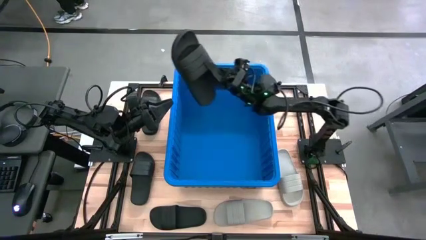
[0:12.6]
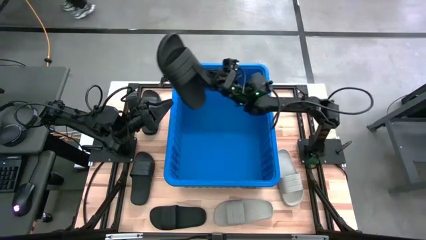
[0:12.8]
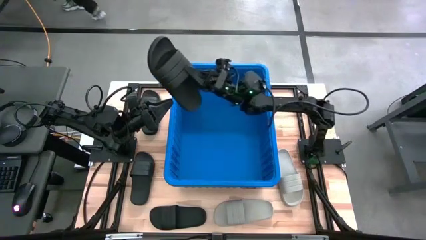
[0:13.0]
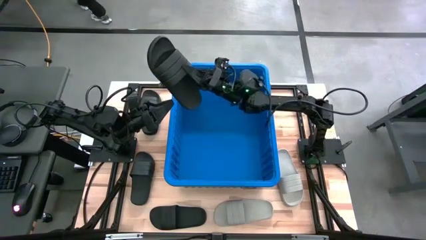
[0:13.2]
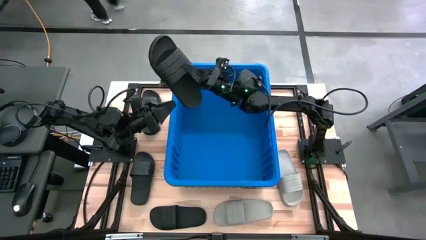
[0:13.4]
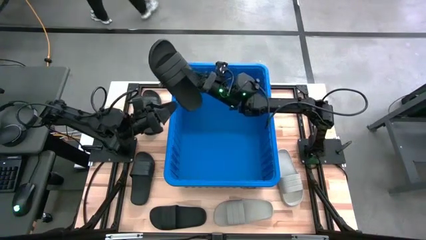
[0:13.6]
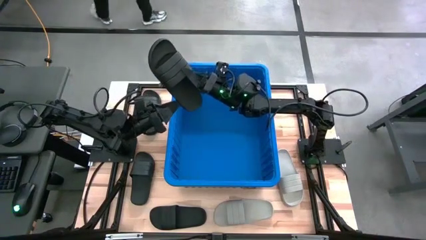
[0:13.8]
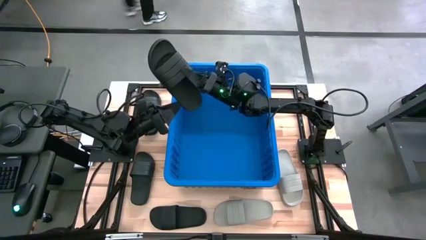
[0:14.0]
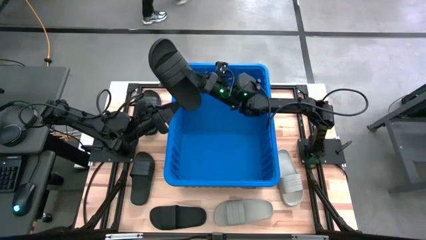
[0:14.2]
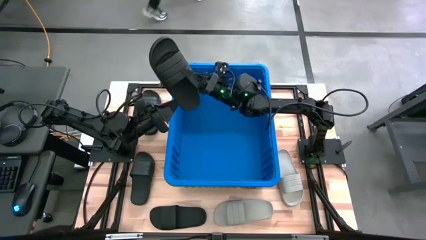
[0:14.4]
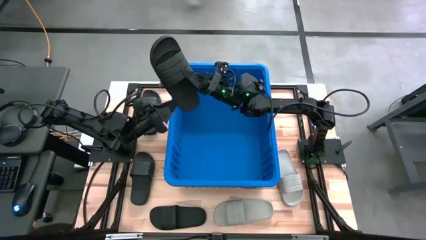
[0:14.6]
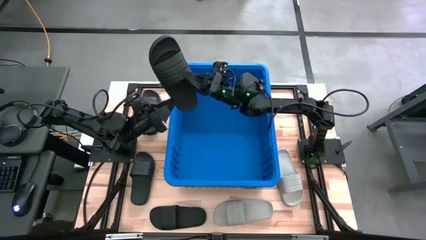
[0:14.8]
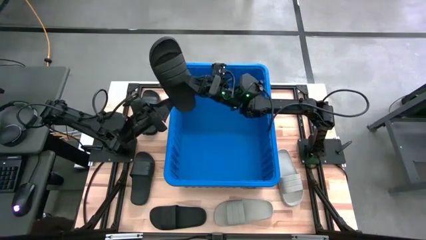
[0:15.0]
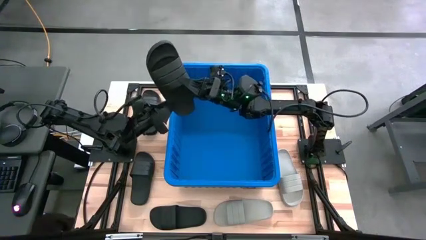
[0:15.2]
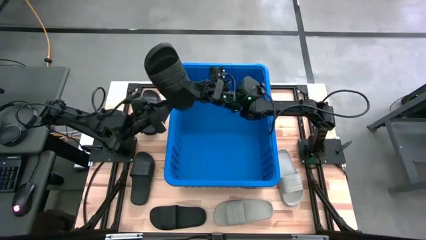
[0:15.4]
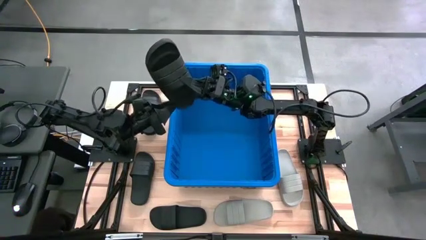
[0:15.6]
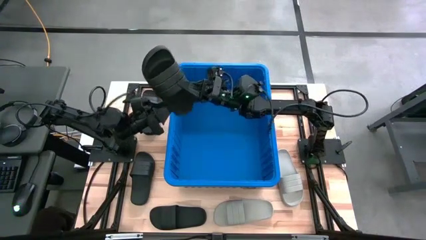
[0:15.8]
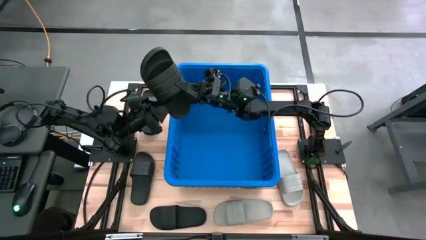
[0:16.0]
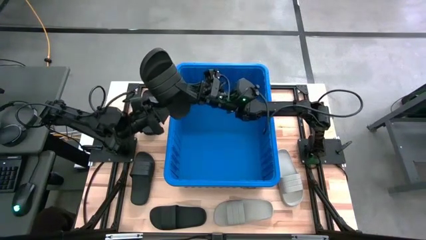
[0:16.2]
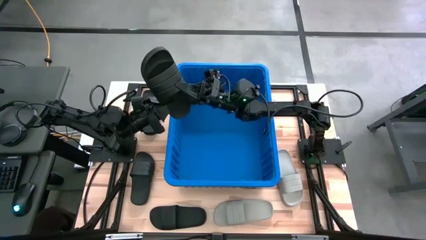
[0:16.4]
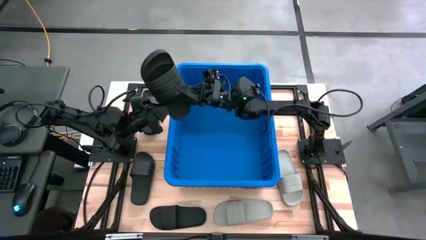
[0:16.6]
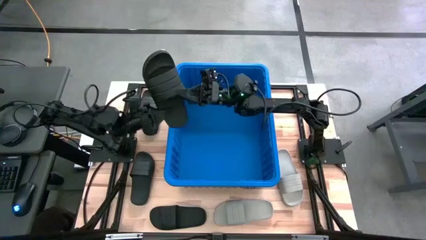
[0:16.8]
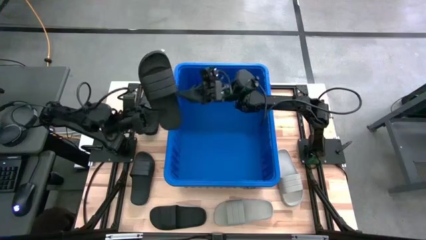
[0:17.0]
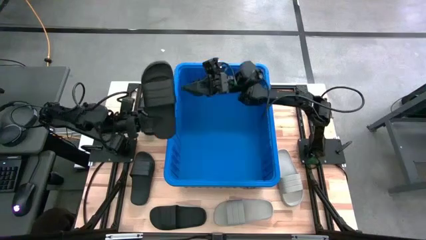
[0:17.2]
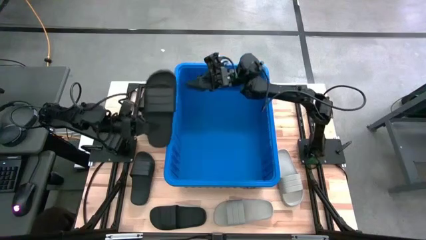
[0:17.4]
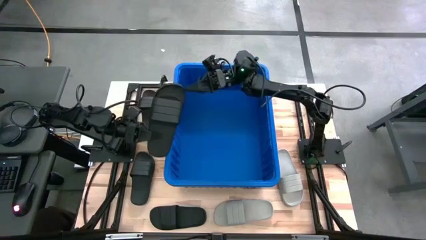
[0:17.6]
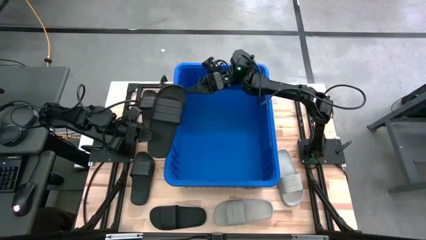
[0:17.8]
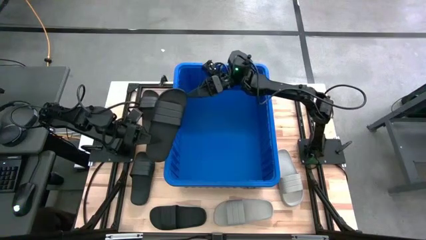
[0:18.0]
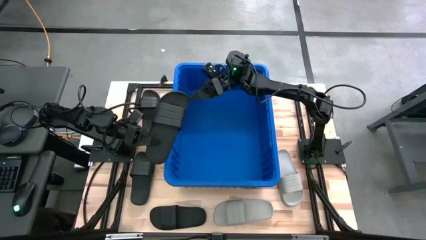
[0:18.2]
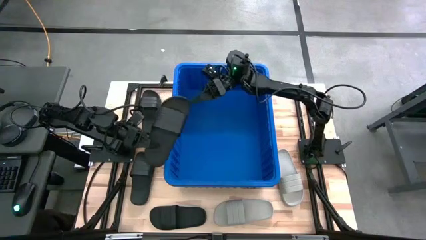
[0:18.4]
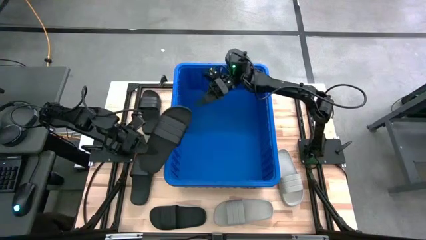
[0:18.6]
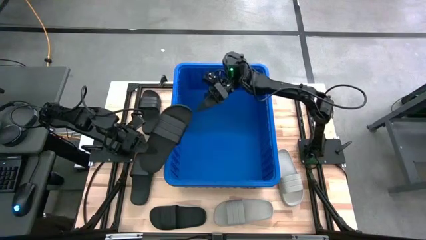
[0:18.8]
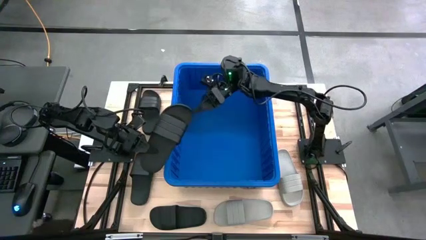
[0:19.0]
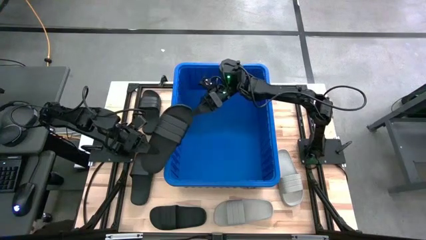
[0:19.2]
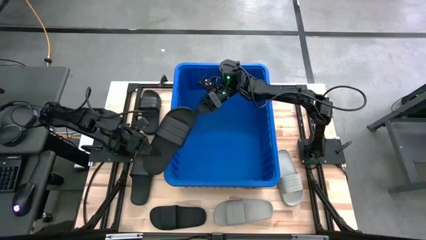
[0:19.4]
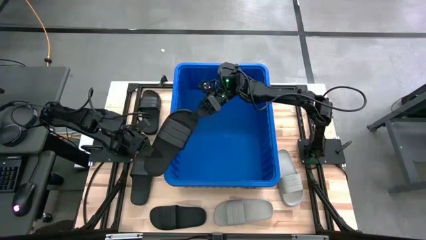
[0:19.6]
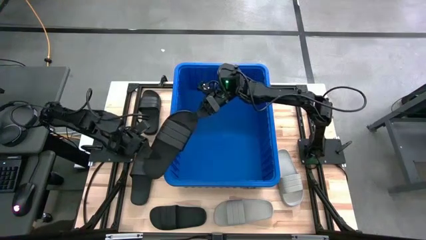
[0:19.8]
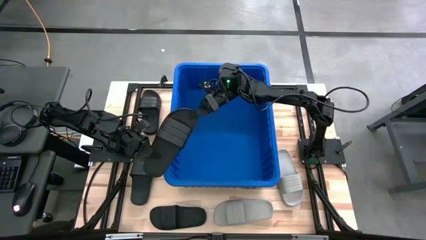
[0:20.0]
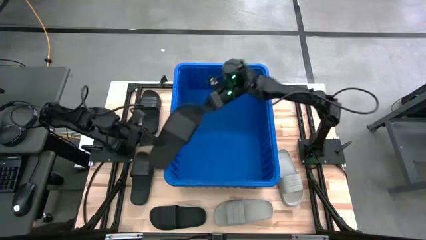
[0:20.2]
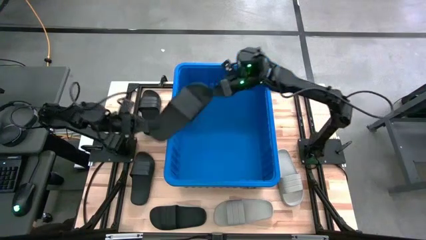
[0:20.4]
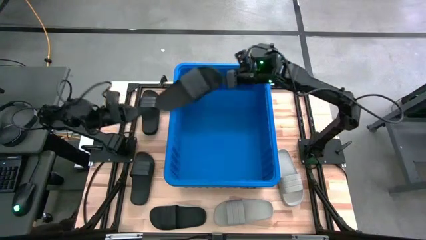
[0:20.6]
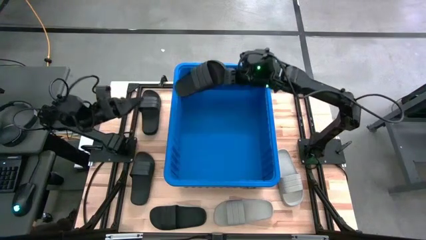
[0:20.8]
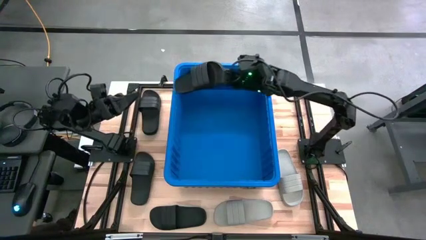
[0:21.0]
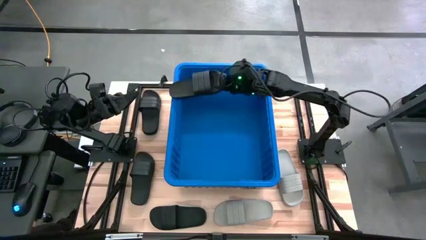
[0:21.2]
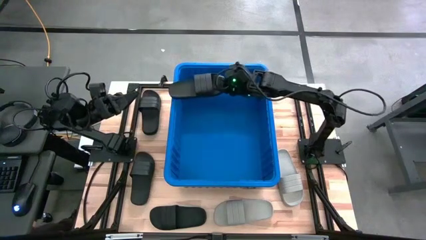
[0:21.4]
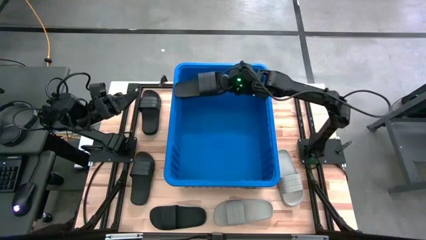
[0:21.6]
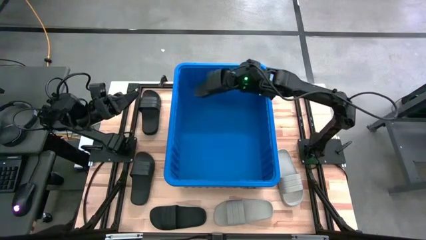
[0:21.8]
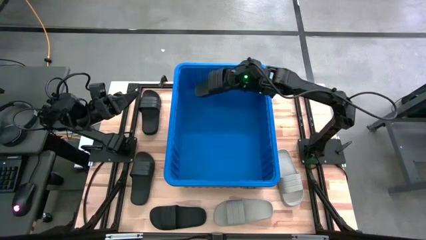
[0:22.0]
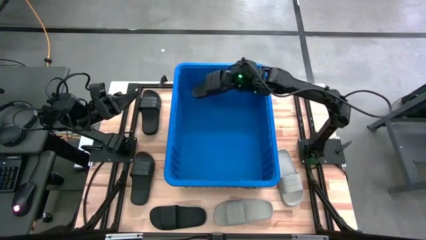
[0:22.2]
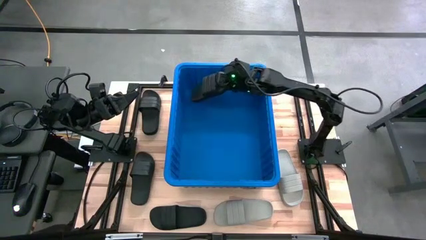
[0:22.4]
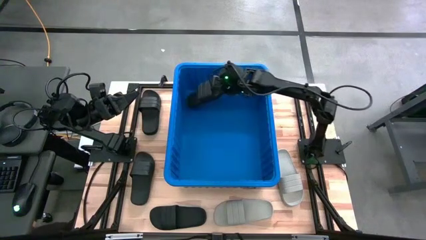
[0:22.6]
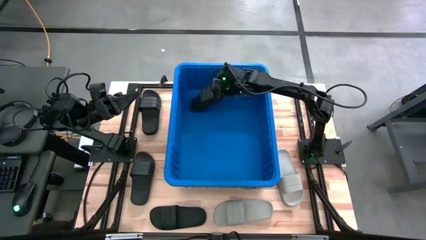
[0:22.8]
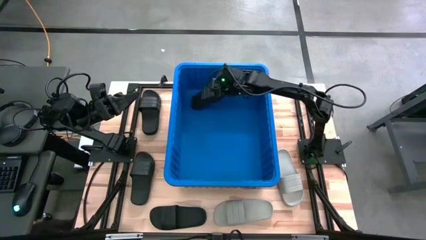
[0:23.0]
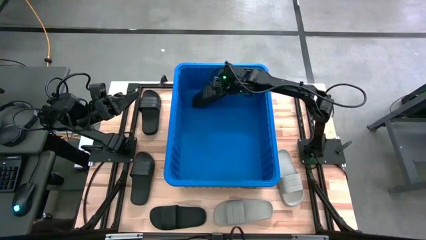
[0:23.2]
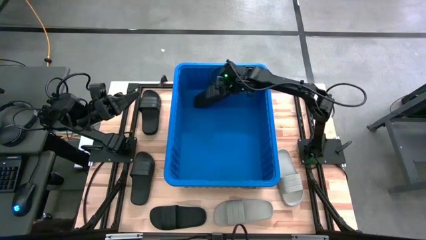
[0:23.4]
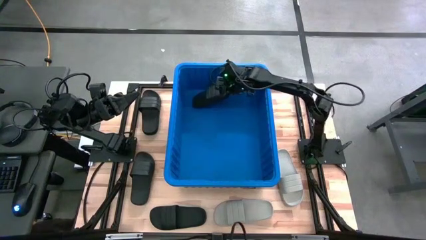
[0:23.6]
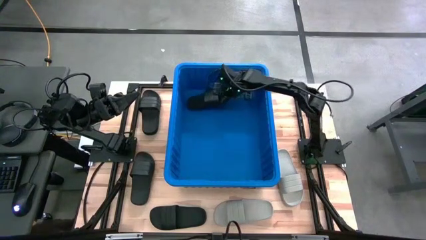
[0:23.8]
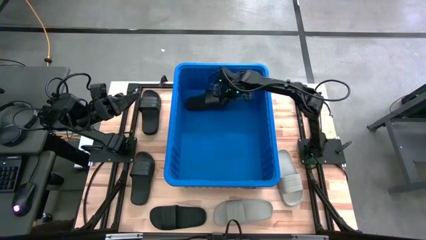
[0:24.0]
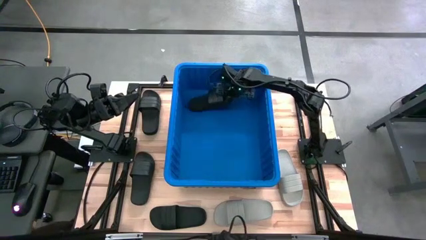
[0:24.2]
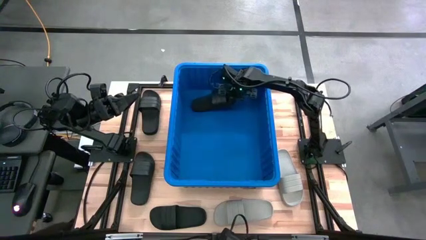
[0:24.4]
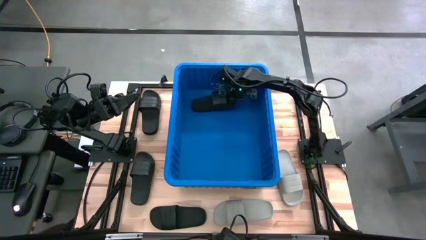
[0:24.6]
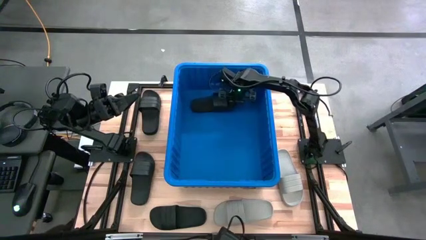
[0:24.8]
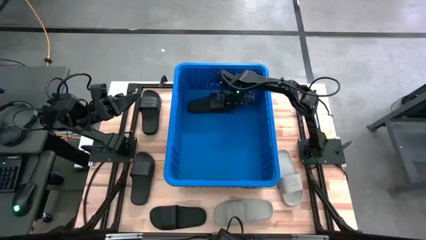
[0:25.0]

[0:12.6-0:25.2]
Task: Pick and place slides into bin
Put the black slipper into the bin
